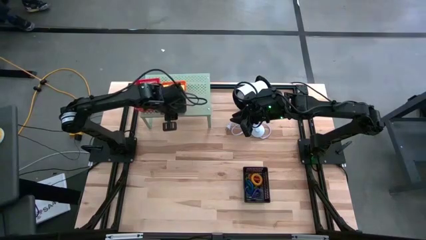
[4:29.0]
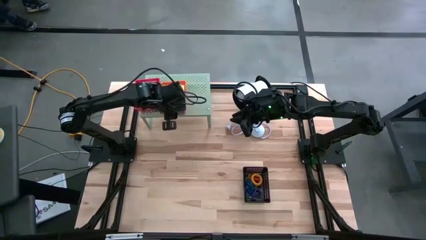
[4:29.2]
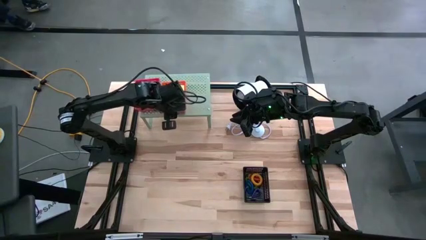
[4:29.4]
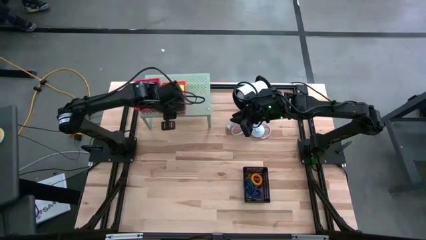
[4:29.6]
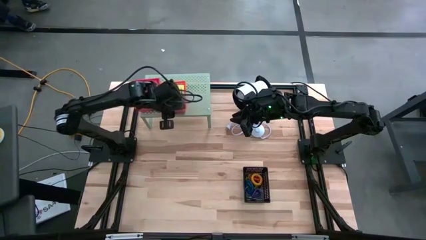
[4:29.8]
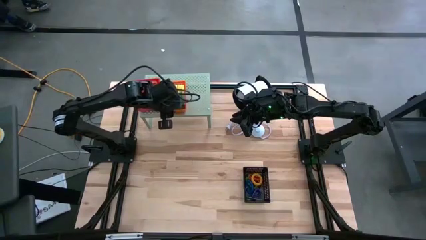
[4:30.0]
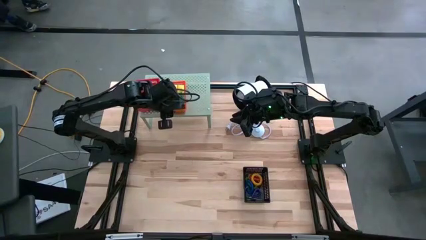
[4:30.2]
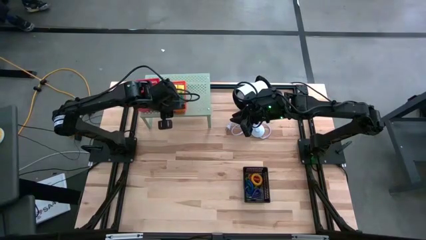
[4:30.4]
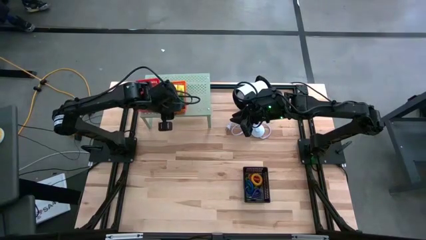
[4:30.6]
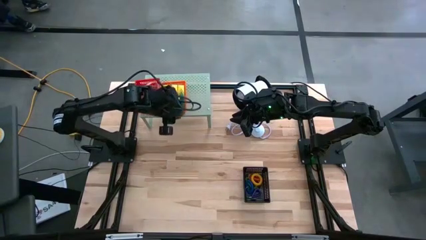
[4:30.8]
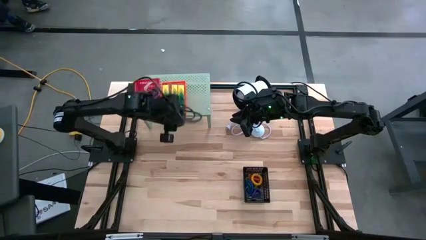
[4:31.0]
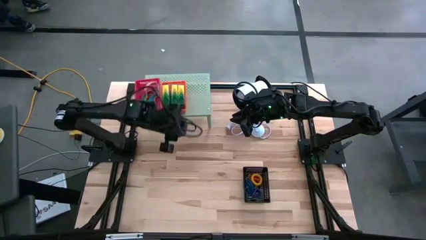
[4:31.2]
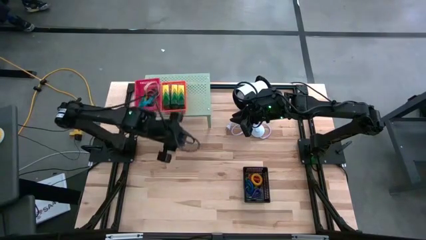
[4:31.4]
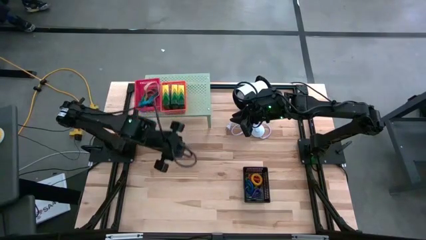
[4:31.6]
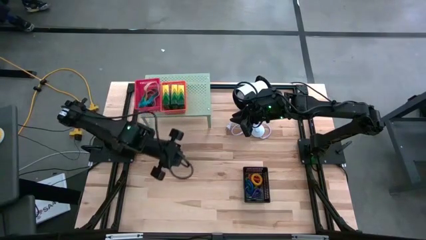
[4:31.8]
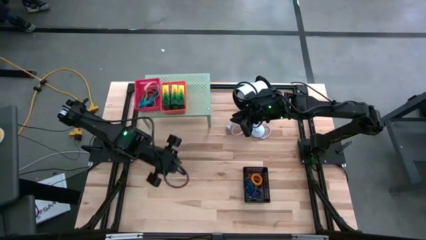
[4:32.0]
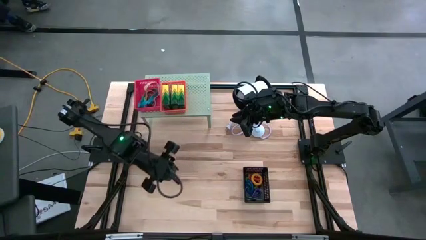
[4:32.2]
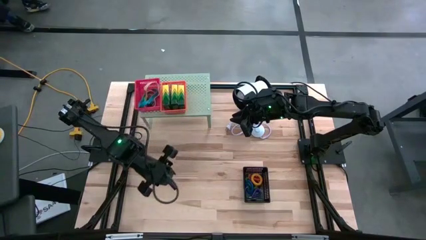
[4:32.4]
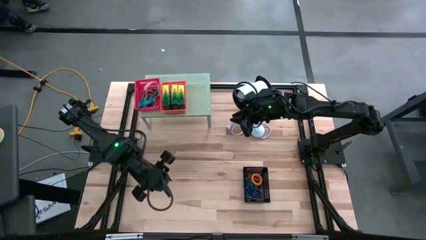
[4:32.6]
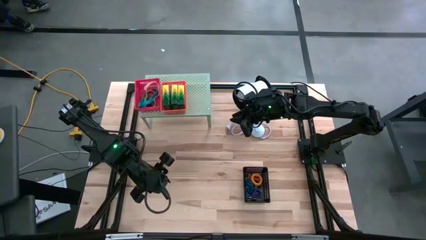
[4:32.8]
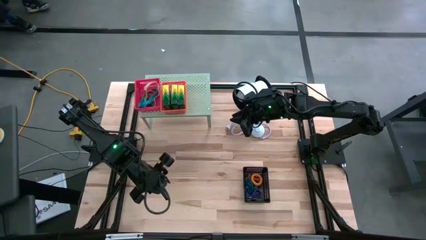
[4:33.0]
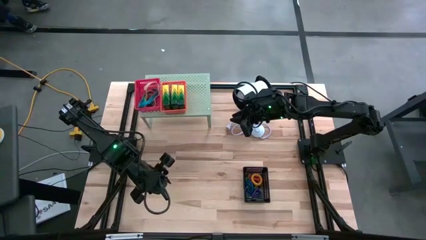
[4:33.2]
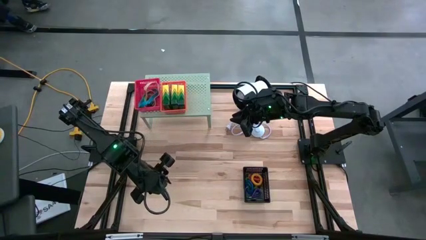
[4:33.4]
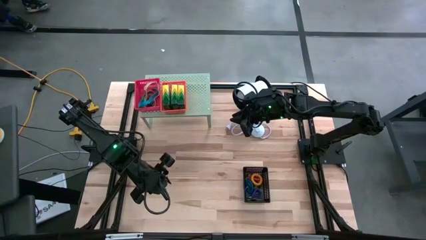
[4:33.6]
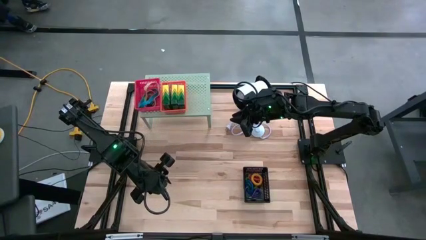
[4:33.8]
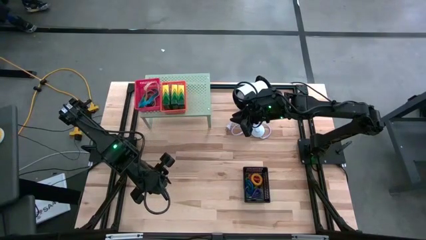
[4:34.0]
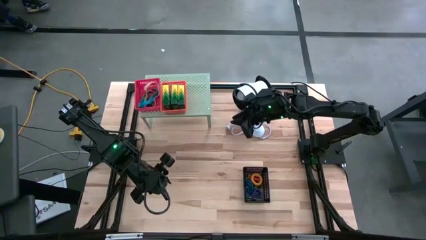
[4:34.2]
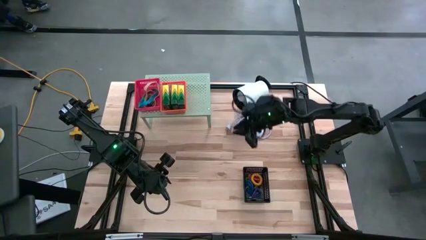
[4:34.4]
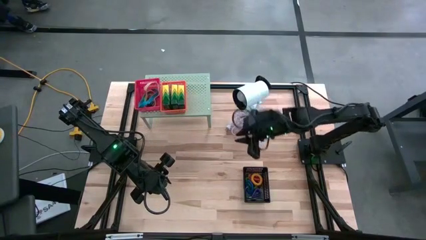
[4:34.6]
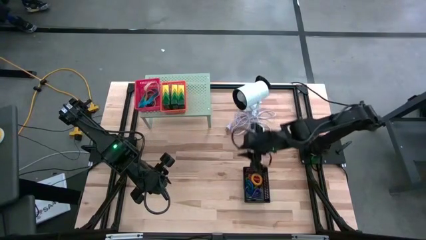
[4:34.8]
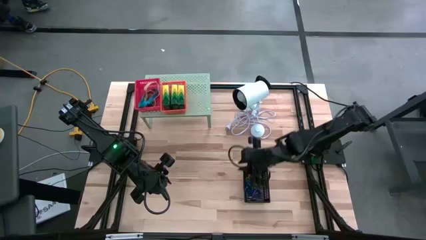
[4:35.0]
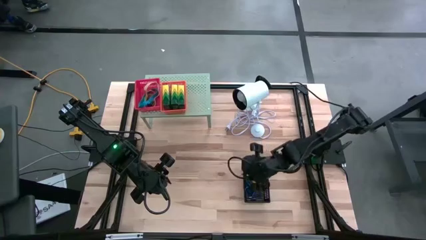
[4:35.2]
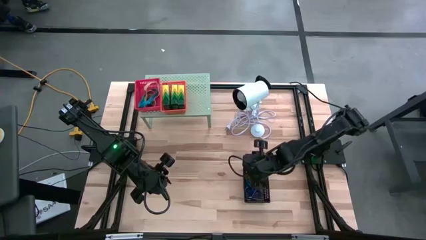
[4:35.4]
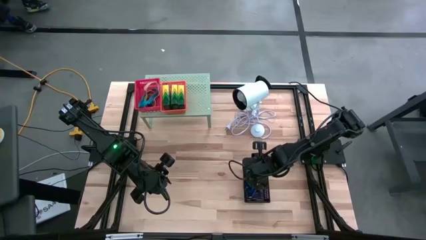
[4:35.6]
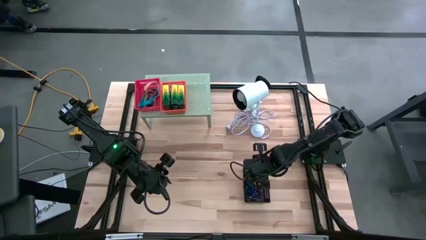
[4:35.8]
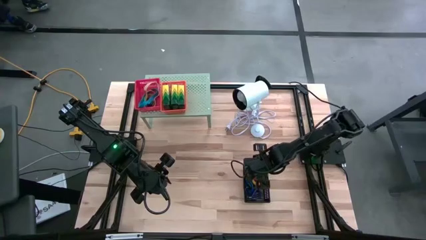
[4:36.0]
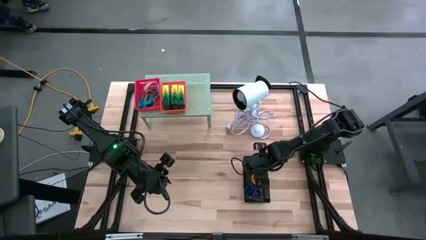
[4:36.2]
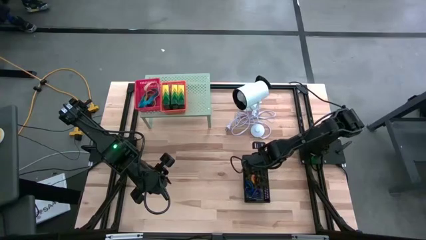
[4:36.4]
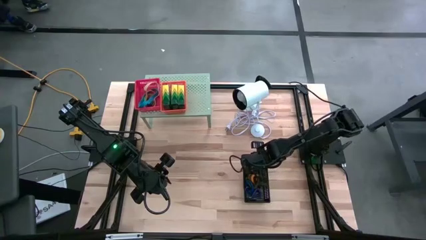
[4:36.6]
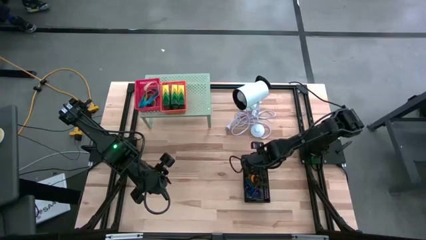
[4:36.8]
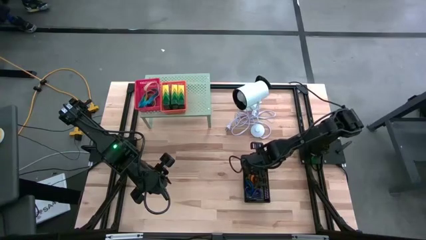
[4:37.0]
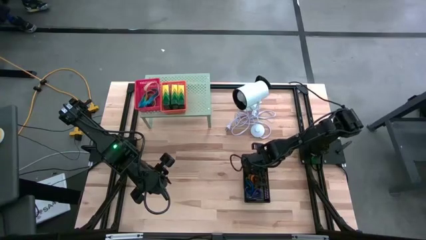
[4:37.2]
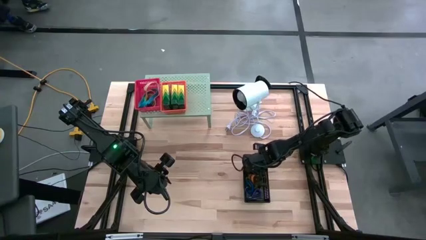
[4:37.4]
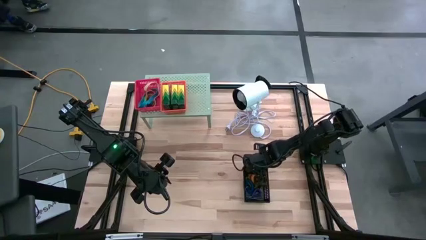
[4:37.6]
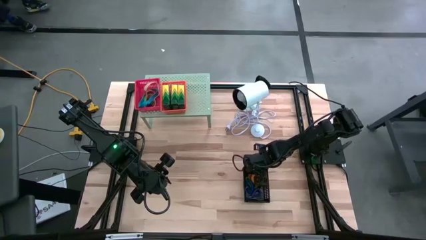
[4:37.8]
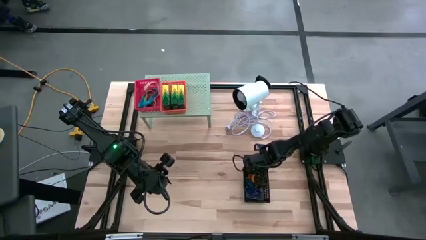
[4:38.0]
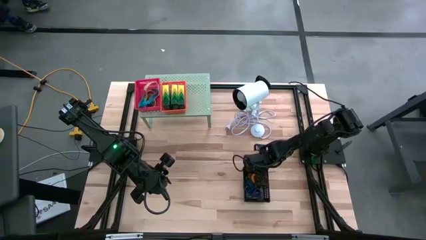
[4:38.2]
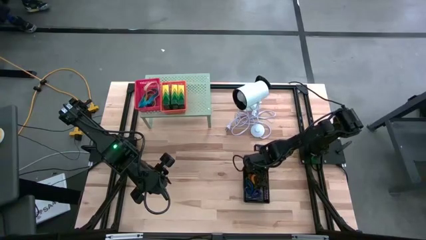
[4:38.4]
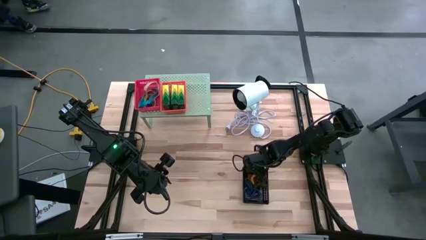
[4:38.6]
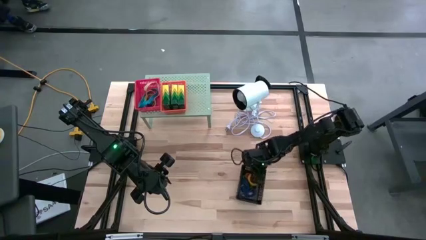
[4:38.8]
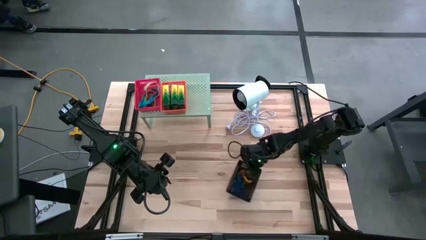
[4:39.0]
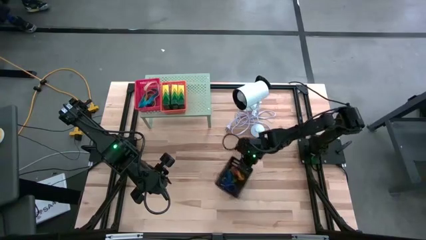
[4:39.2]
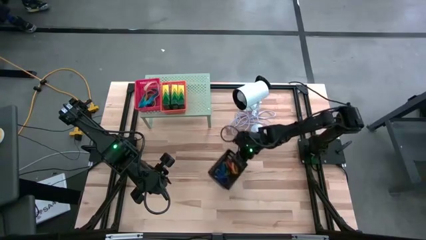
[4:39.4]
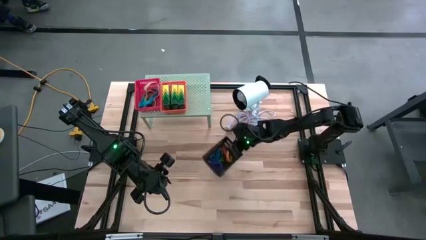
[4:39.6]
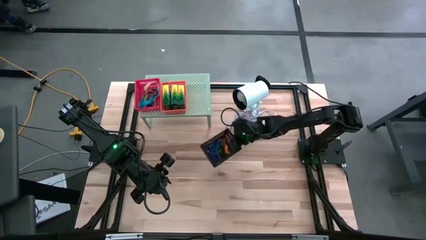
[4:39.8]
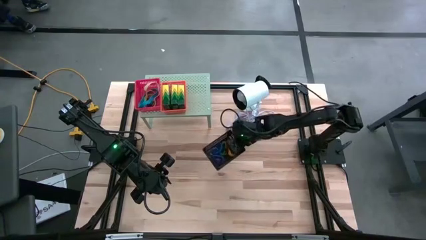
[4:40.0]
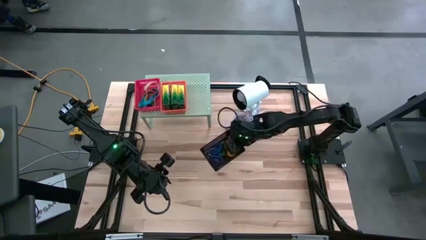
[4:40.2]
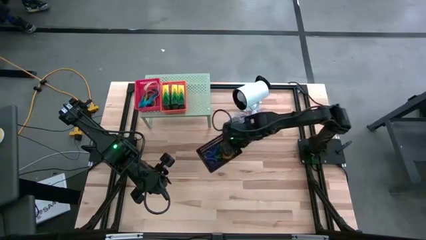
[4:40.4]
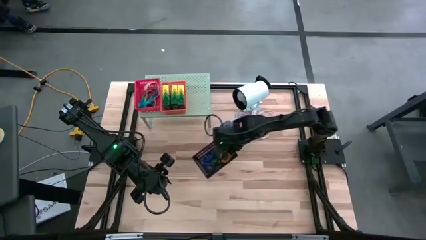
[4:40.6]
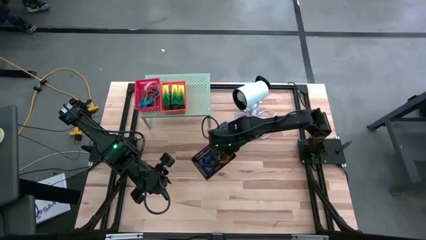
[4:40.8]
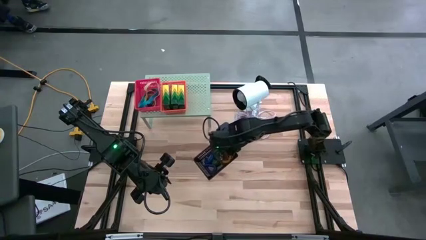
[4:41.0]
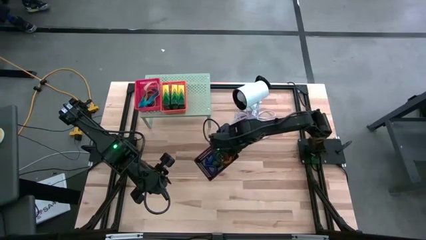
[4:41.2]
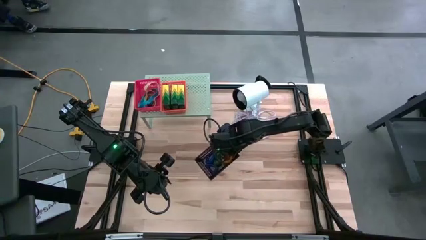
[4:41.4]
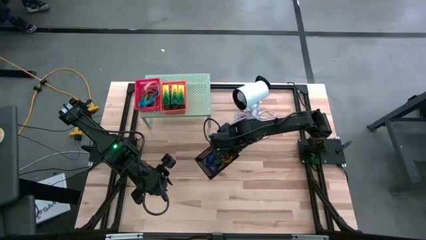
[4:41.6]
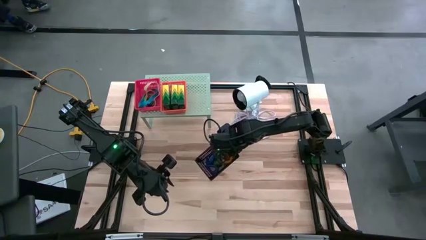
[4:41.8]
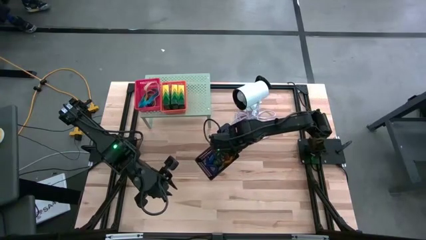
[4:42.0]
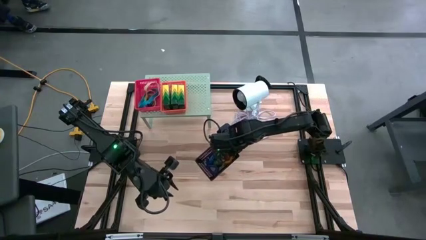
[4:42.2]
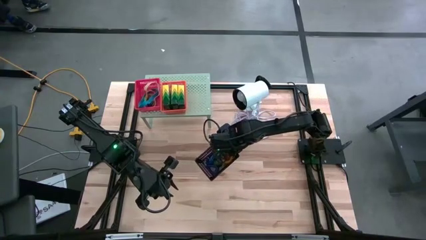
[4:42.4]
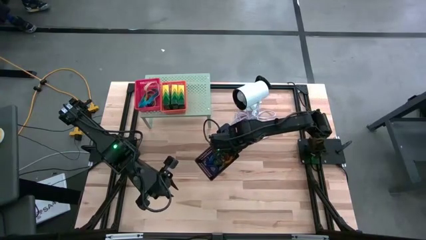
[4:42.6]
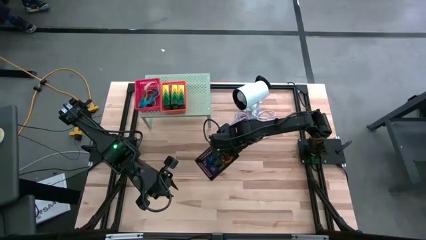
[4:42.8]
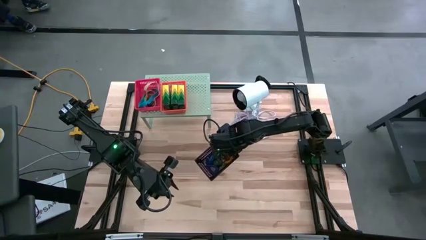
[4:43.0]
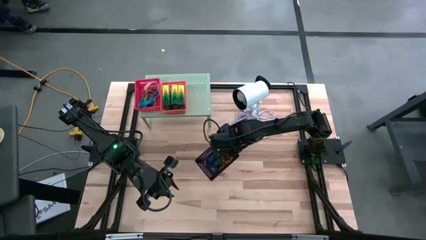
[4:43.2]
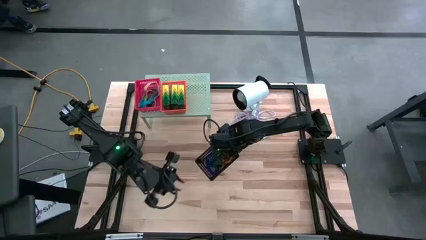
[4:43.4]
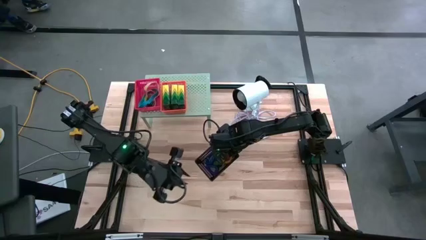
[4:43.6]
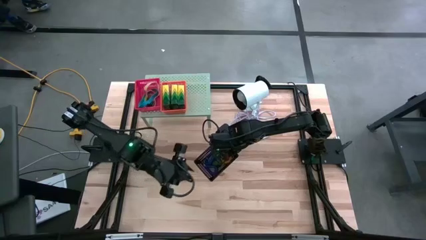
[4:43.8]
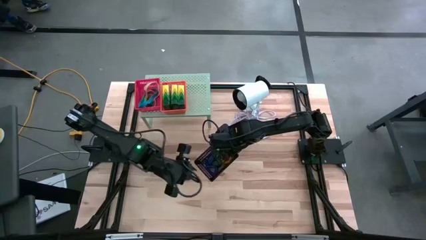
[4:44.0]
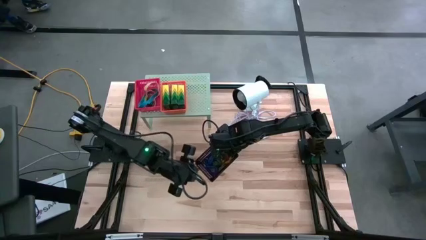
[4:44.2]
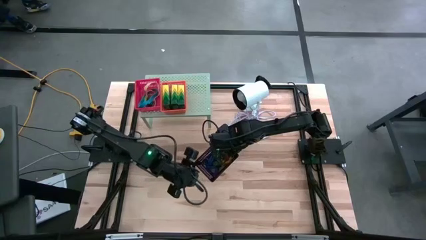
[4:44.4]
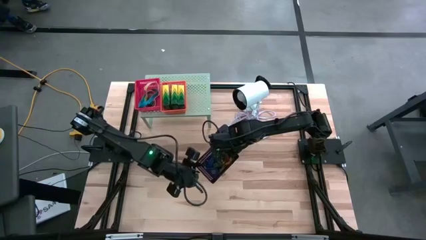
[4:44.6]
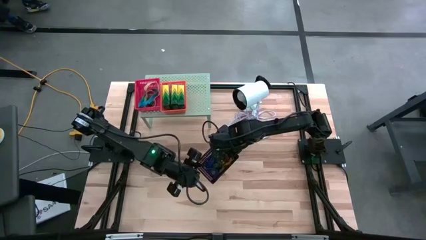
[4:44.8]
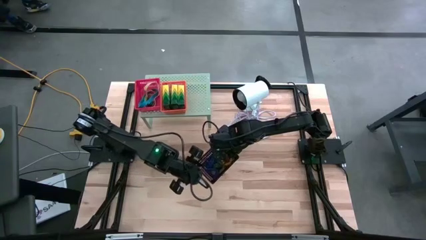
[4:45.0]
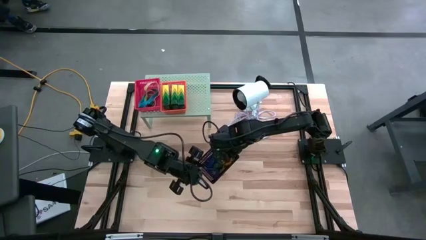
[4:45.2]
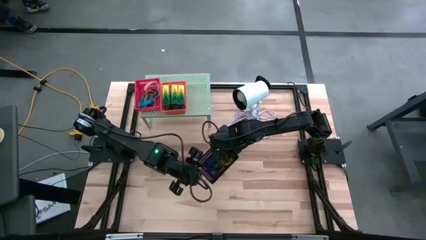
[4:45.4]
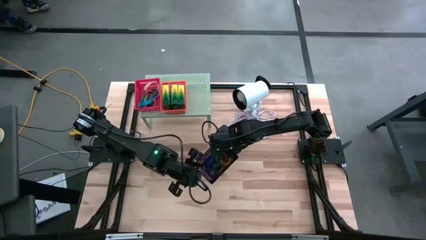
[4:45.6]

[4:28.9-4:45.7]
Task: Pick & Place Office Desk Supplies
Put the black basket on the shelf
